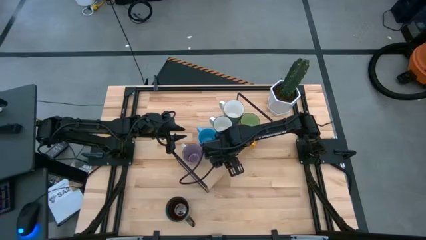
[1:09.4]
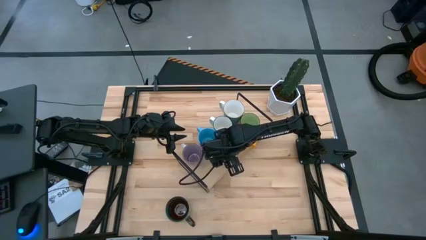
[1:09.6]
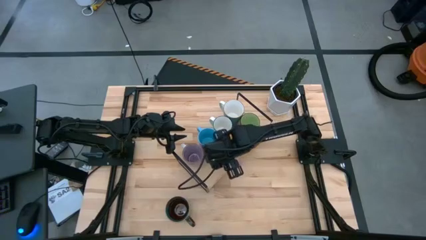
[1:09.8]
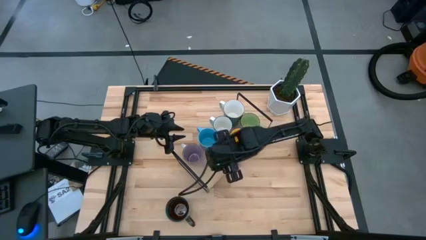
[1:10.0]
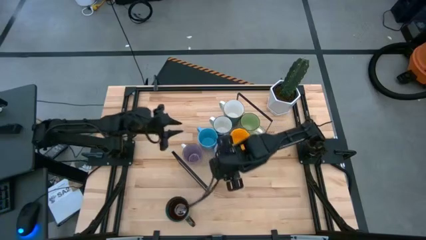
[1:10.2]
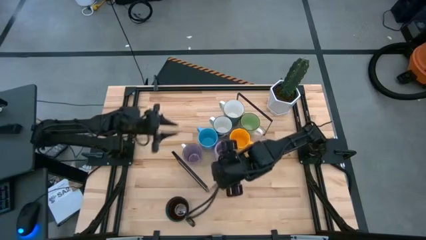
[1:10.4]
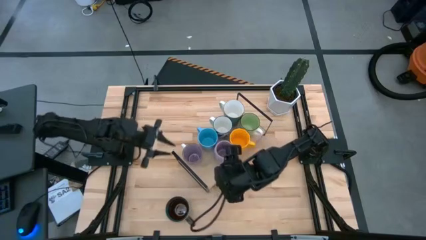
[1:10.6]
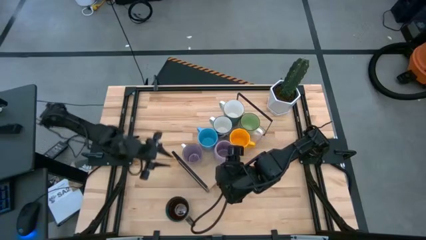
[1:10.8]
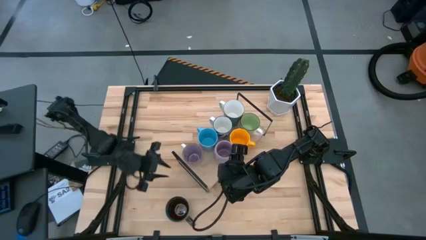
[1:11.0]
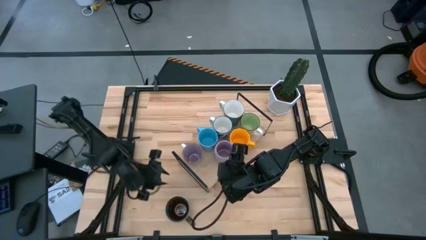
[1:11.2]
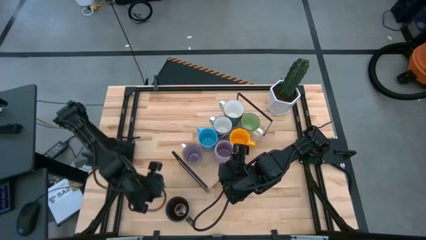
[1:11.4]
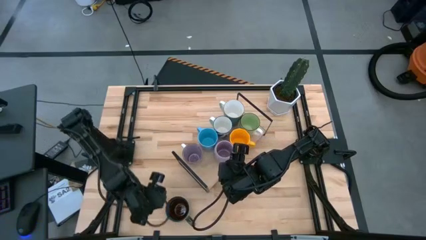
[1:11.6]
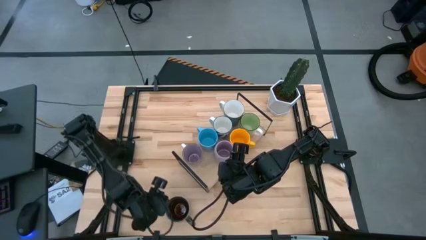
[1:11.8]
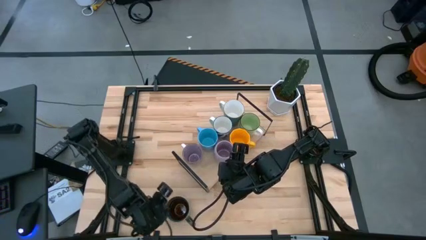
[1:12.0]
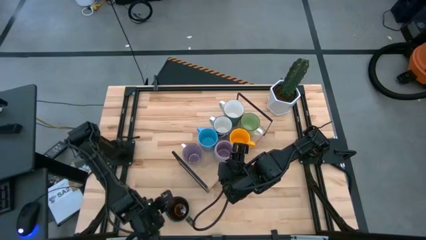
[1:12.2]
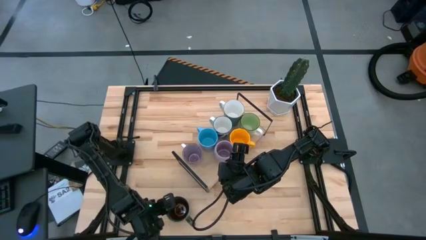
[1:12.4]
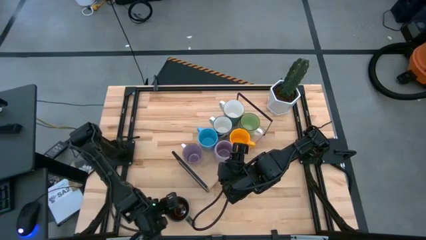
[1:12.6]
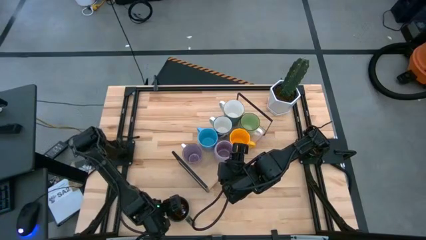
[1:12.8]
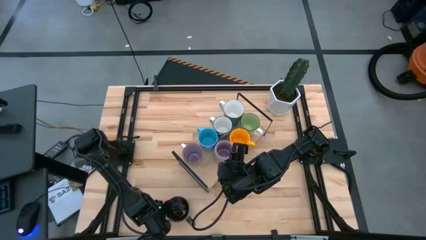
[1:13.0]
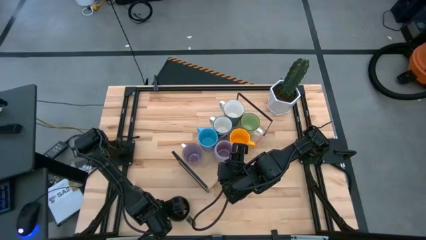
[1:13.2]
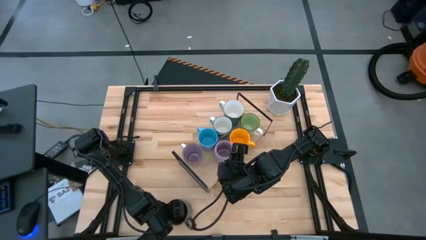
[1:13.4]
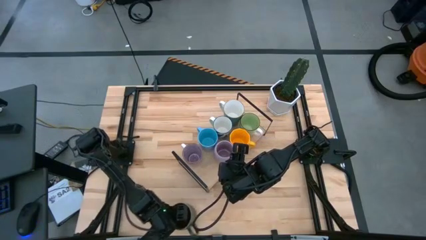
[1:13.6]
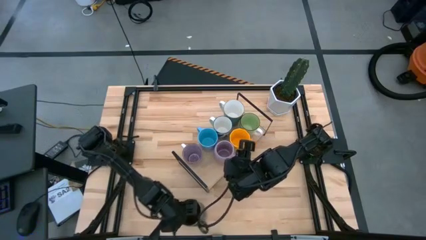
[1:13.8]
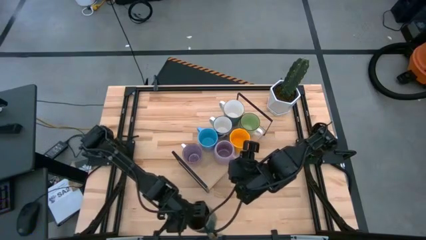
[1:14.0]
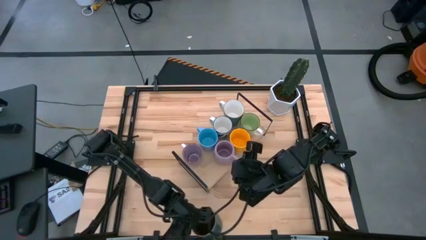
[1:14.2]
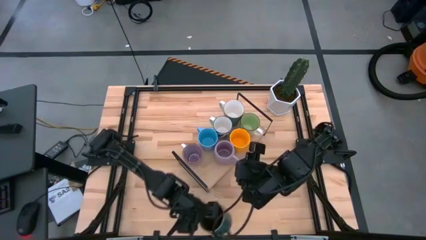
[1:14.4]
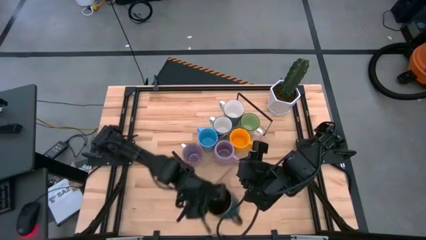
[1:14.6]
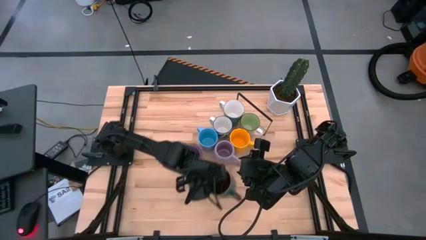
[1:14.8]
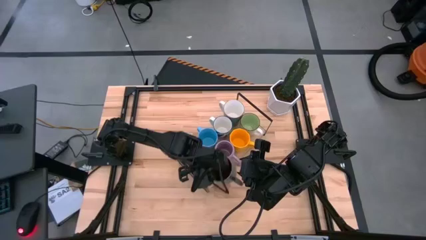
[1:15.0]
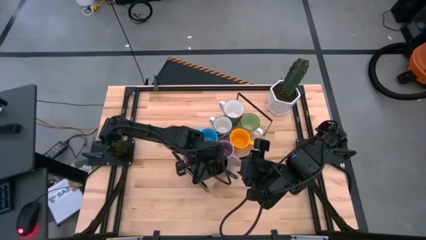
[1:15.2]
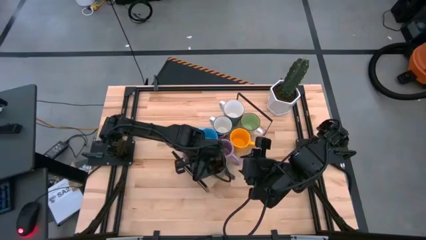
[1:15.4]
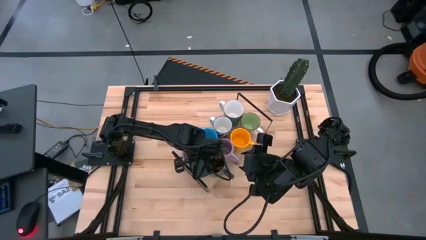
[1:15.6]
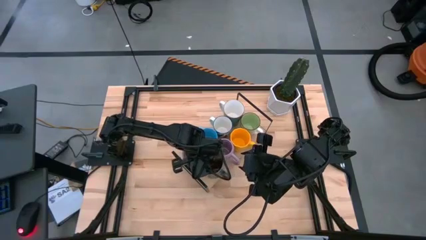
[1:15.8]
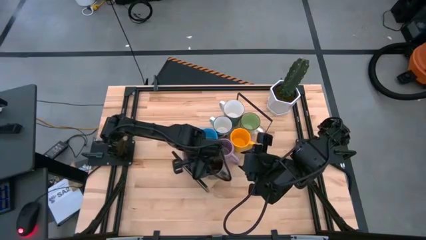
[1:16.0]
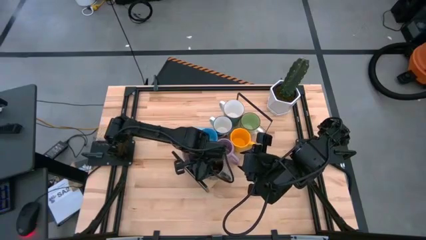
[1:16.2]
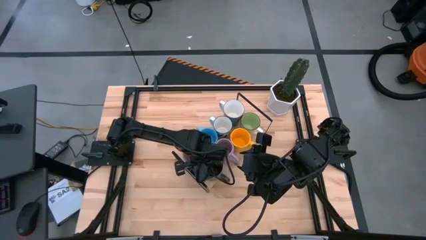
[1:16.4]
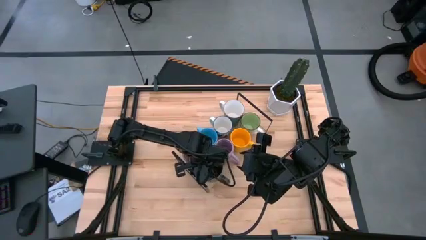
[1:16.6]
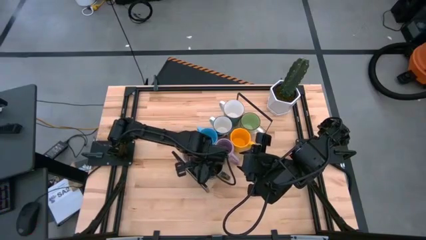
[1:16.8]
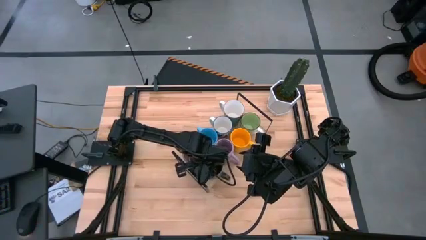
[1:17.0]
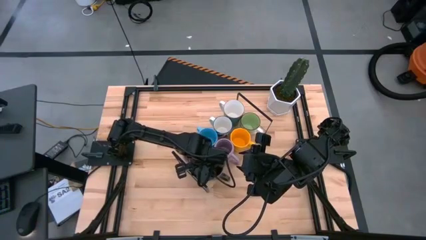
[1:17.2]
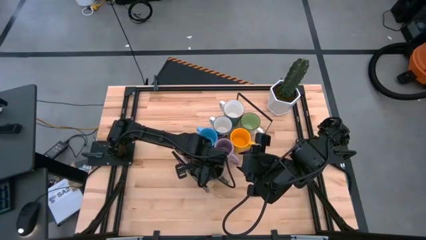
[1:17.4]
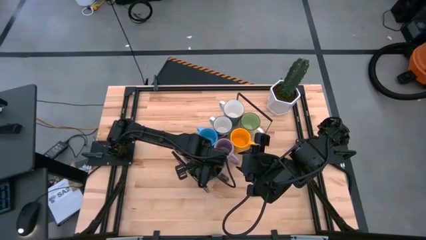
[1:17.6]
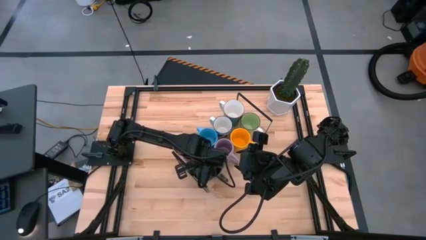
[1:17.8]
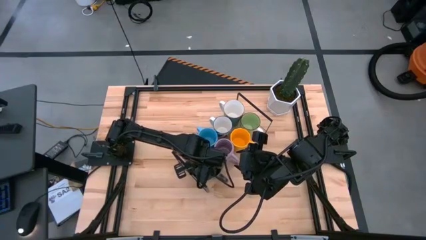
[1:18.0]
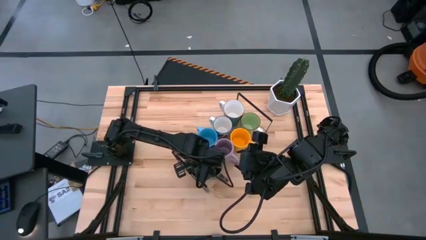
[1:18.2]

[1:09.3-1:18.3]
Task: Place coffee mugs
Put the dark green mug on the shelf aligned with the violet mugs

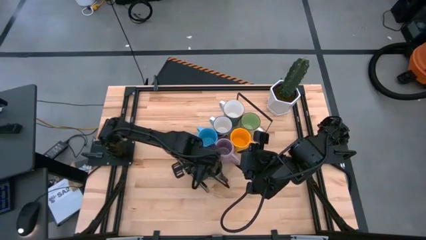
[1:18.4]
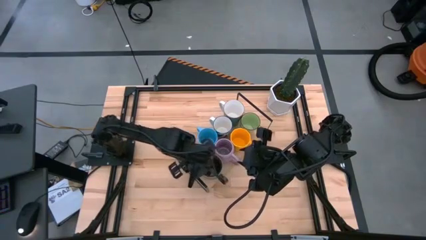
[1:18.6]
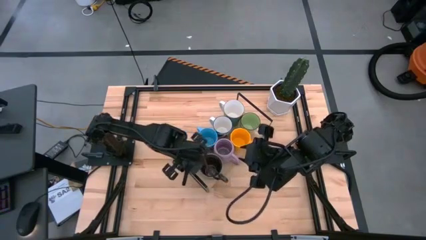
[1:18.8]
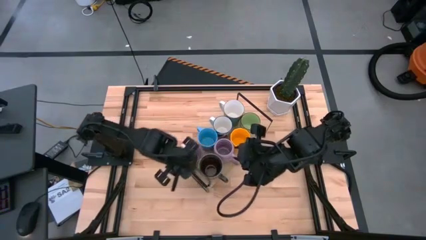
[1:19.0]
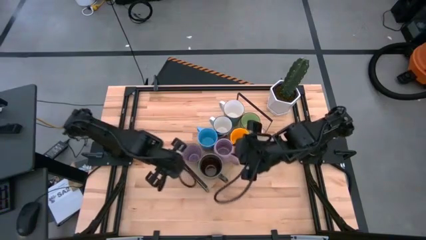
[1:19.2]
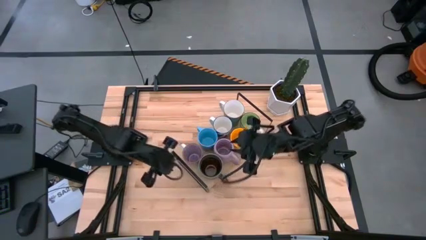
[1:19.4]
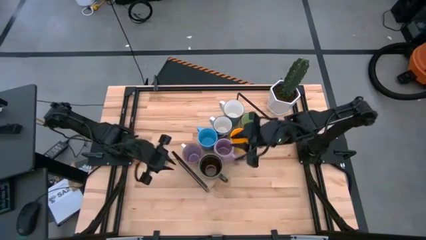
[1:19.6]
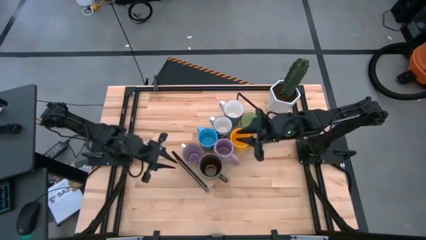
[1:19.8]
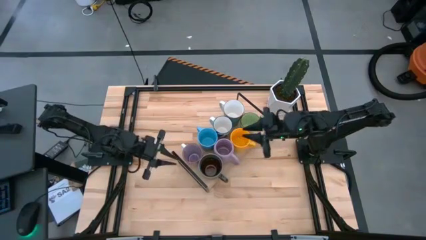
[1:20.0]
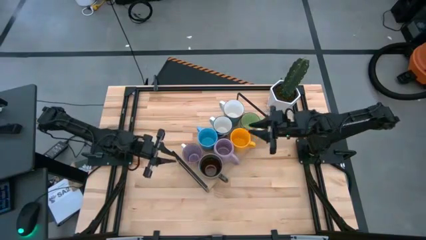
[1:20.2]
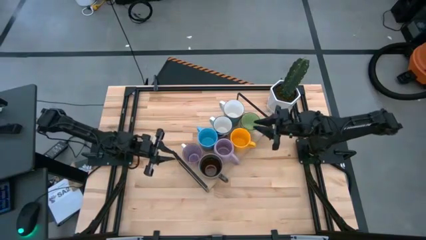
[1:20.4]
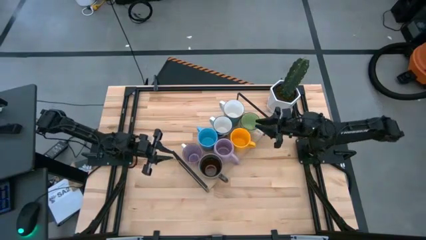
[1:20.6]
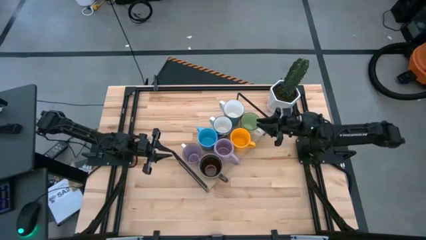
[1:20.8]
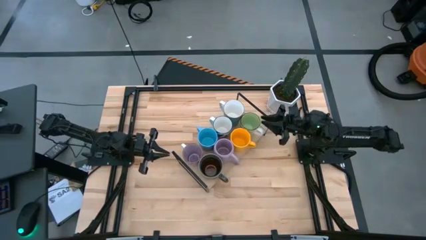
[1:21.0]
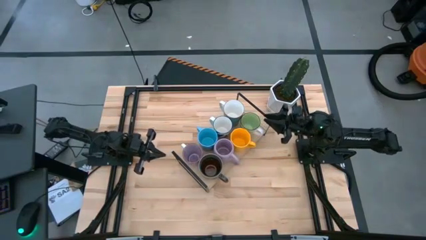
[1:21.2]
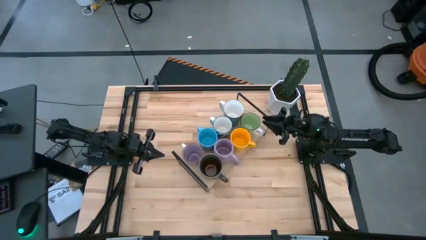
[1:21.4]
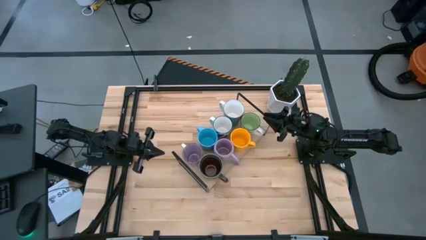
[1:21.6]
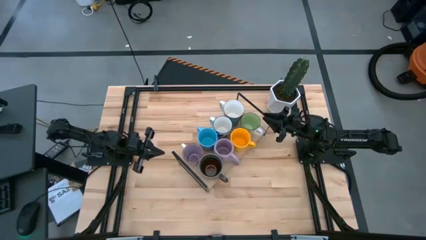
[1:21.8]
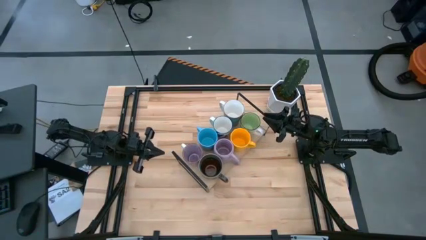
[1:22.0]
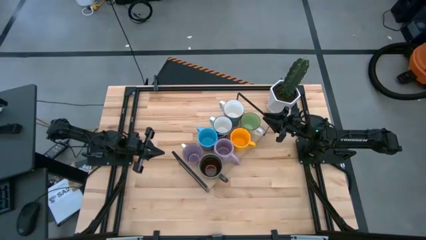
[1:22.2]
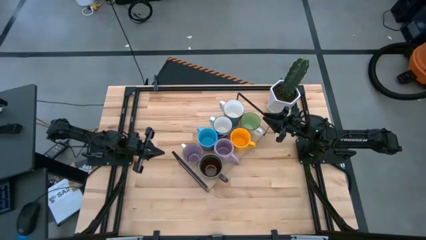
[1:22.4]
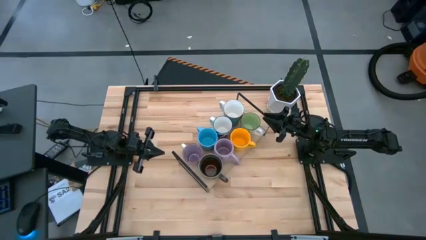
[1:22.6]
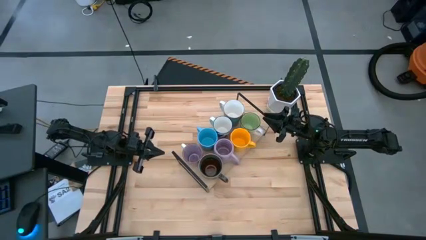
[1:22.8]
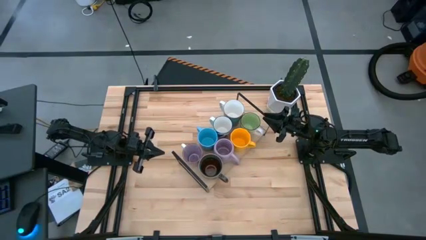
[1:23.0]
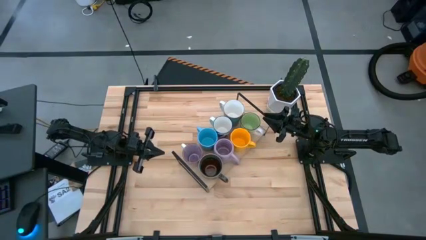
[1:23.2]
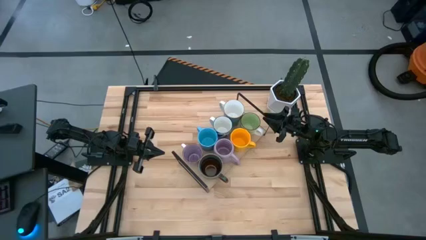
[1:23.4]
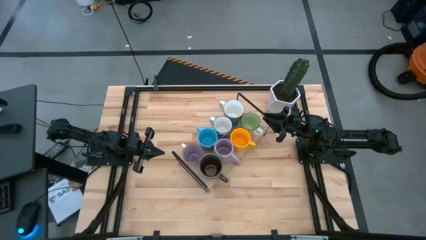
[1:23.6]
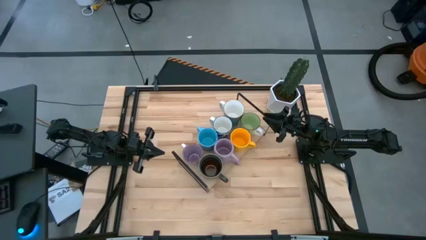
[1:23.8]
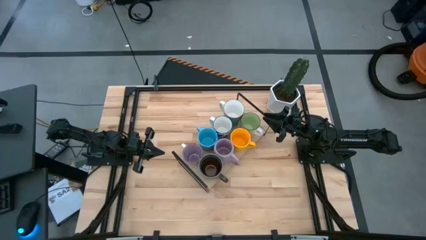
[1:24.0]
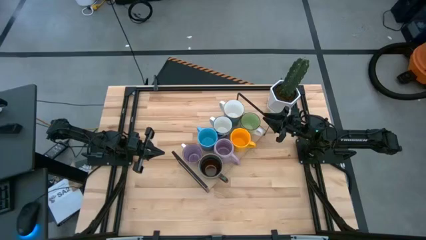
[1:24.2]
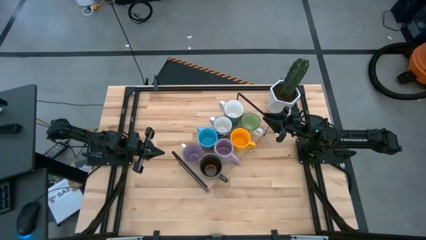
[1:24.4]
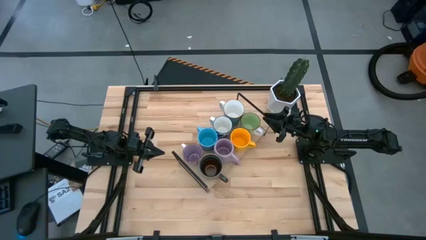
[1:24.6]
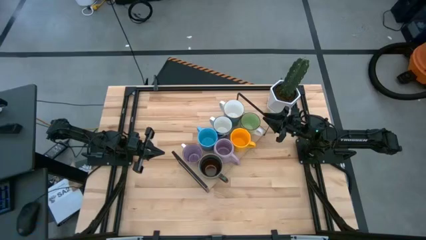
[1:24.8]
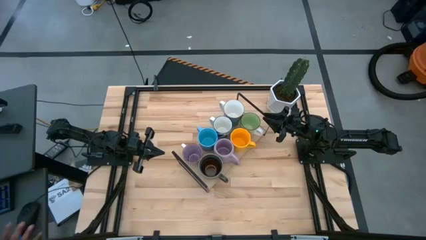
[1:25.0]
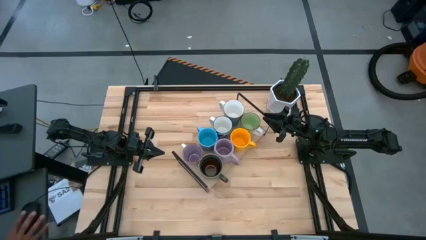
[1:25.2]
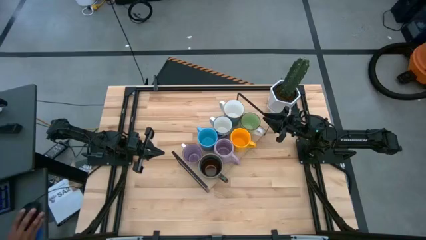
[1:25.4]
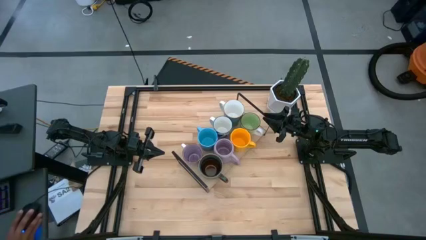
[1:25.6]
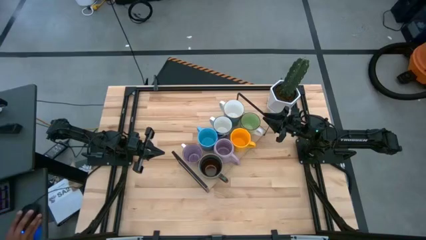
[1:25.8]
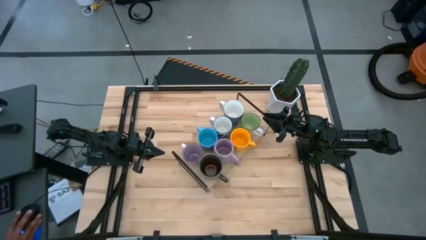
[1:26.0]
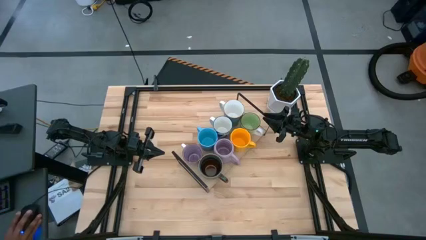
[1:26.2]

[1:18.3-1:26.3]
Return to Home Position
